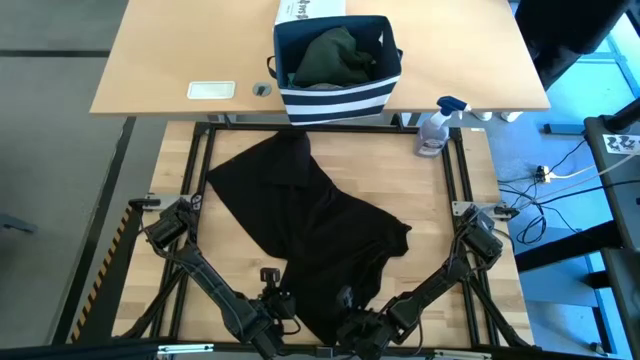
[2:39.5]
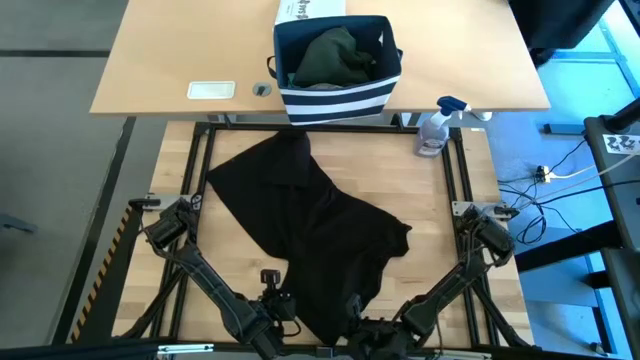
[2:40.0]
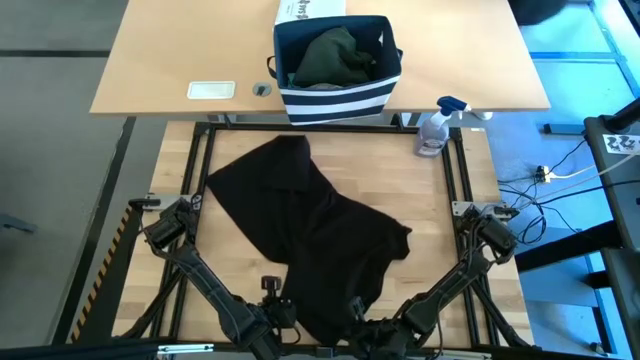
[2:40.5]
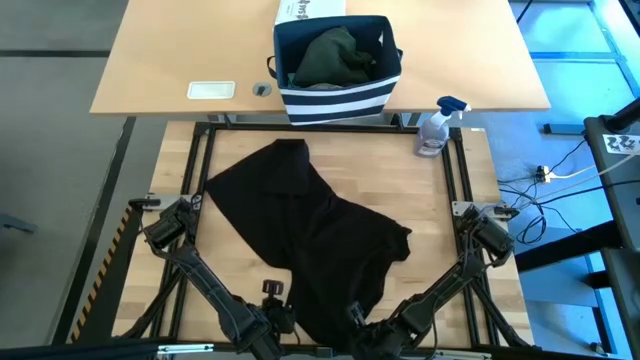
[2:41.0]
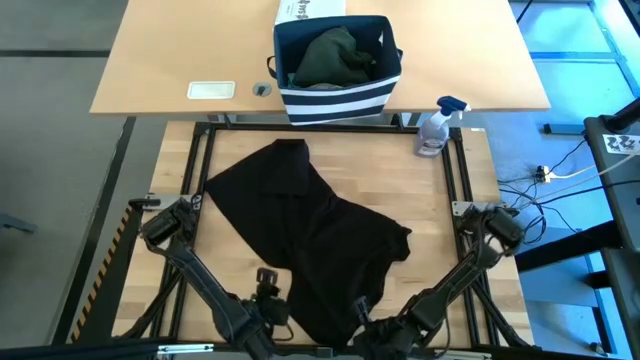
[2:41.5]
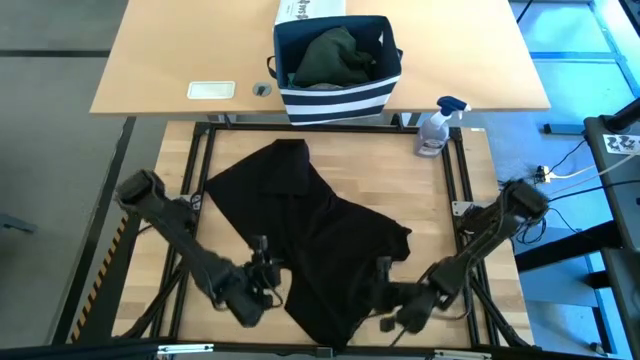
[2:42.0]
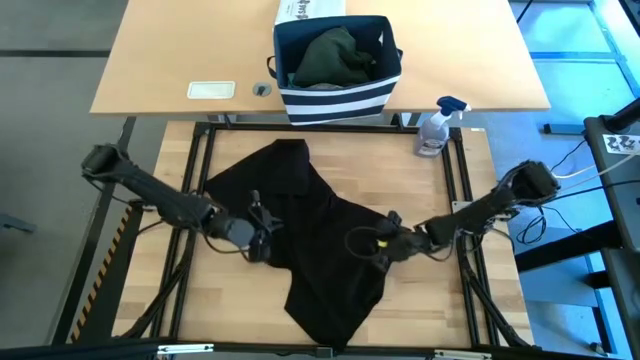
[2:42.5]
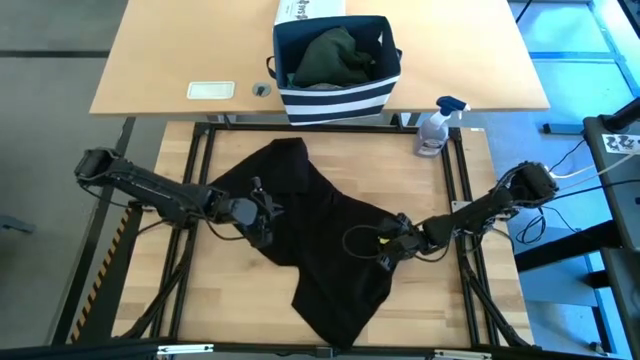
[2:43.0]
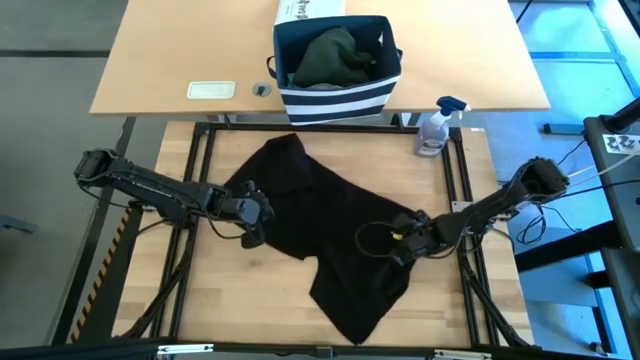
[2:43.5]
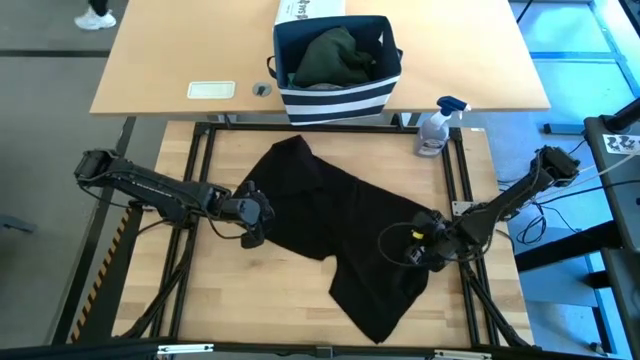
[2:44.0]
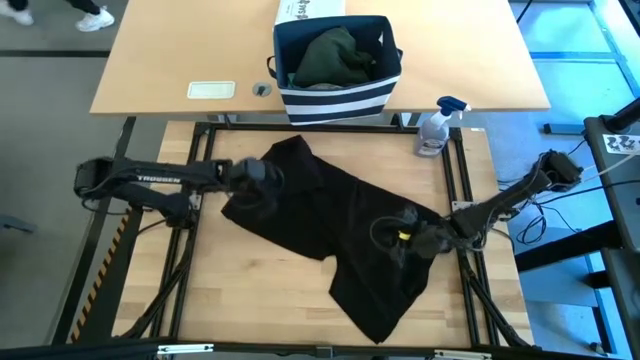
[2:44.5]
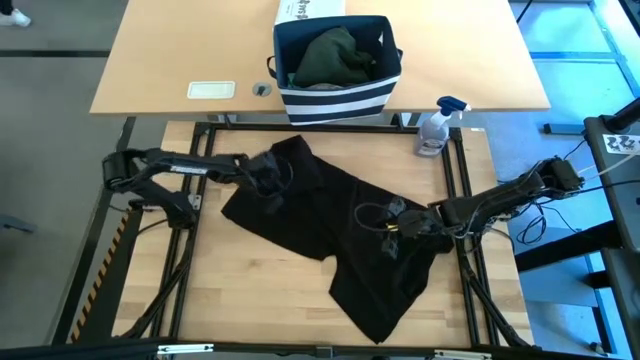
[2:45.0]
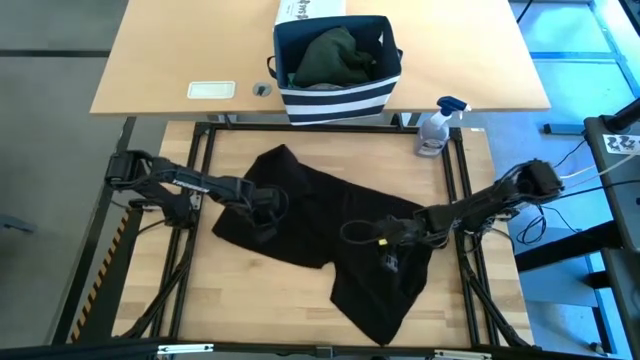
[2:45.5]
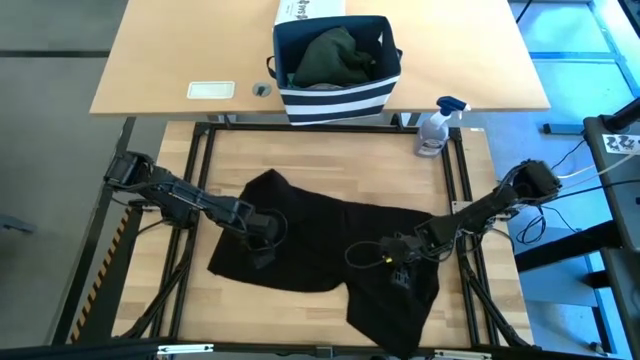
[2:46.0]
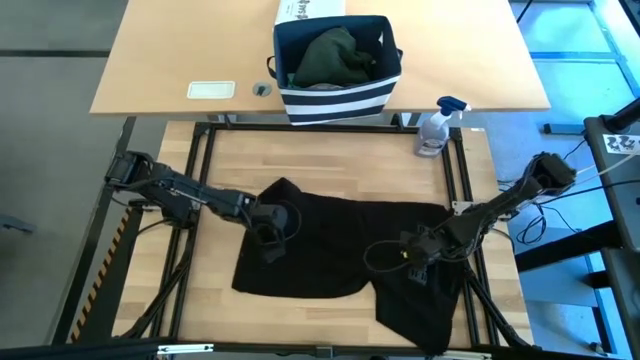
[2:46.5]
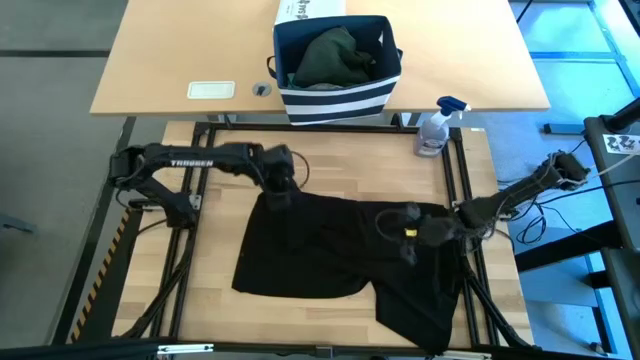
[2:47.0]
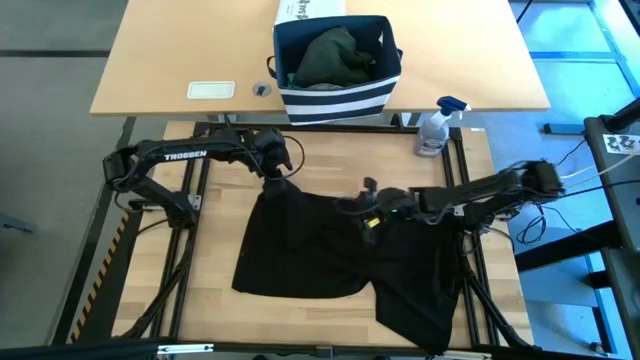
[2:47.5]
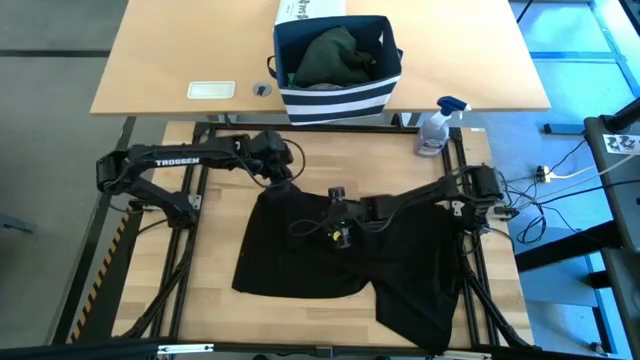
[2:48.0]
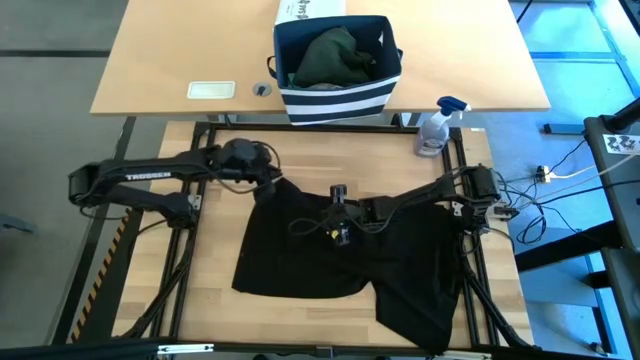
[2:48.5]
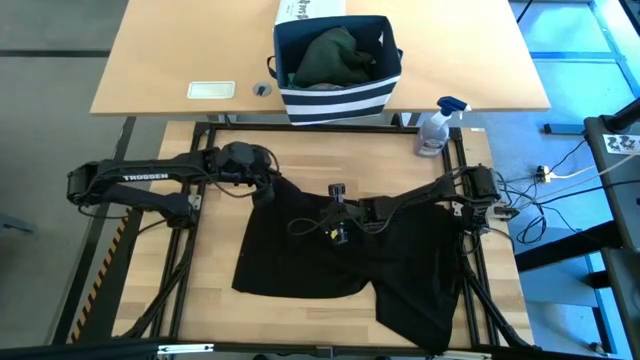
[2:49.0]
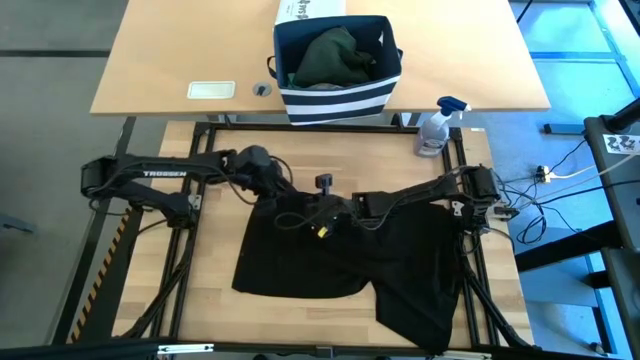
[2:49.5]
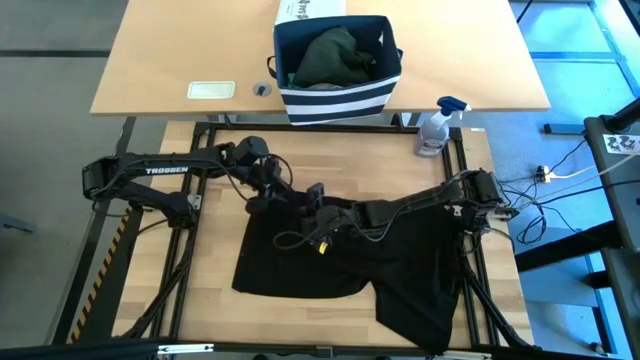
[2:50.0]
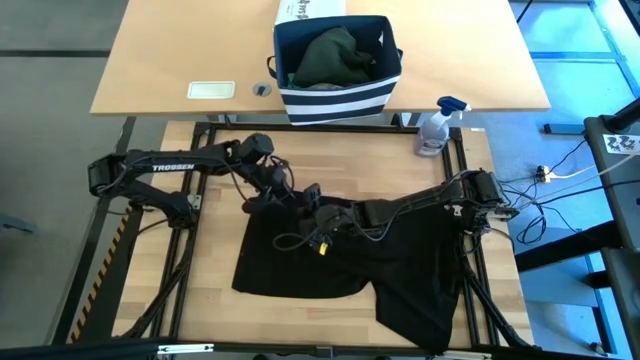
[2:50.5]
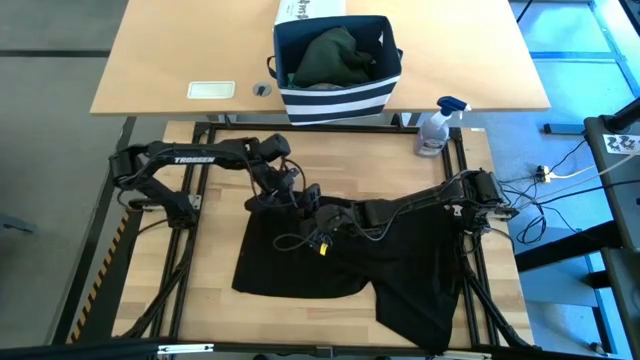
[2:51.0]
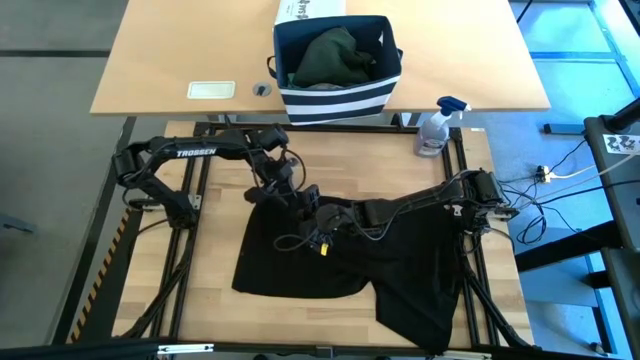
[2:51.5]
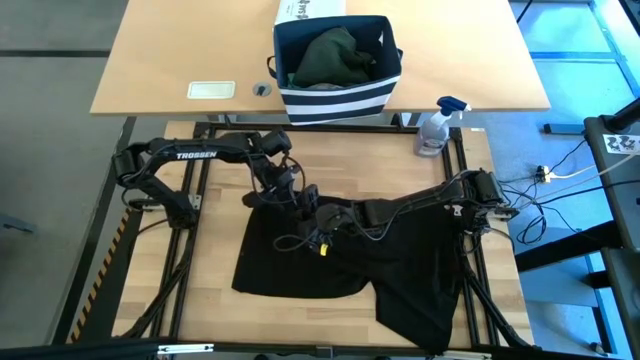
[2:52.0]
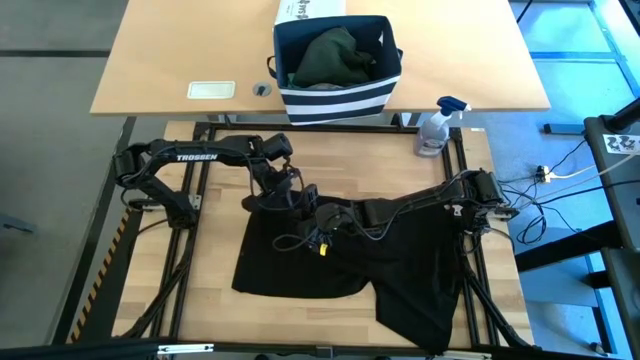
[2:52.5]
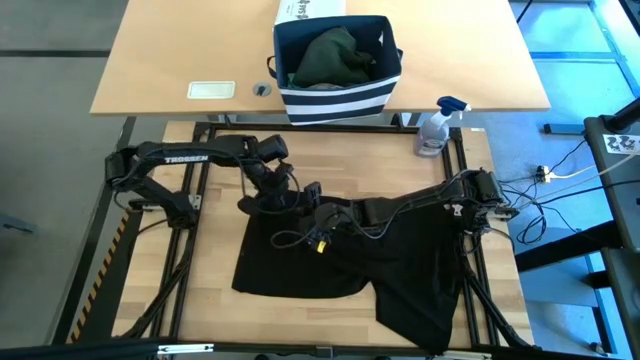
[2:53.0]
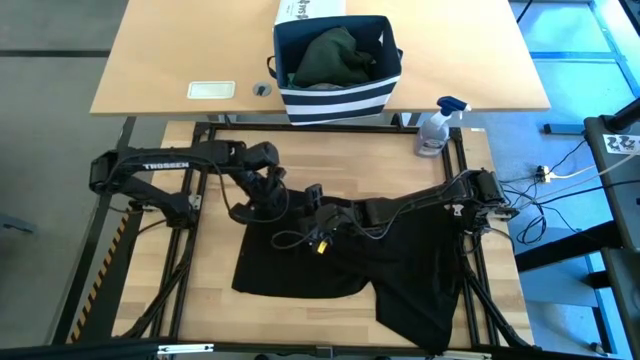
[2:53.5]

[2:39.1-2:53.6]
Task: Fold Laundry from Bin
Fold the black shirt

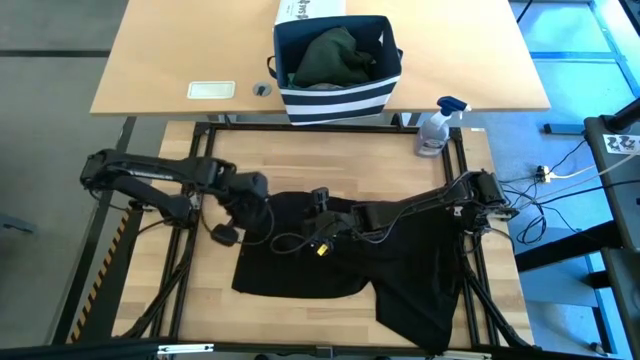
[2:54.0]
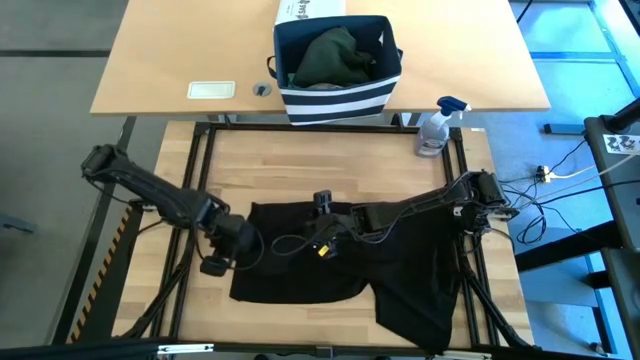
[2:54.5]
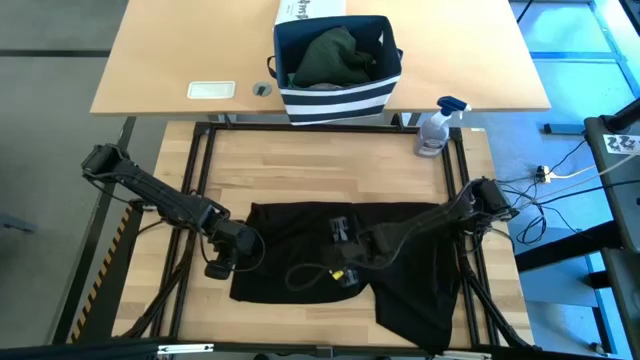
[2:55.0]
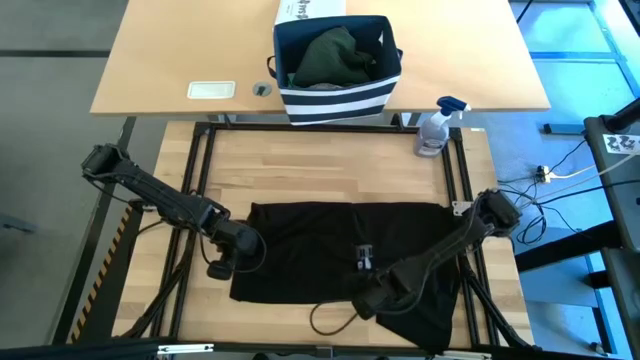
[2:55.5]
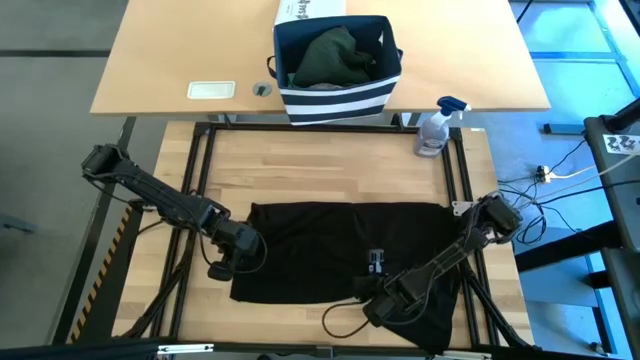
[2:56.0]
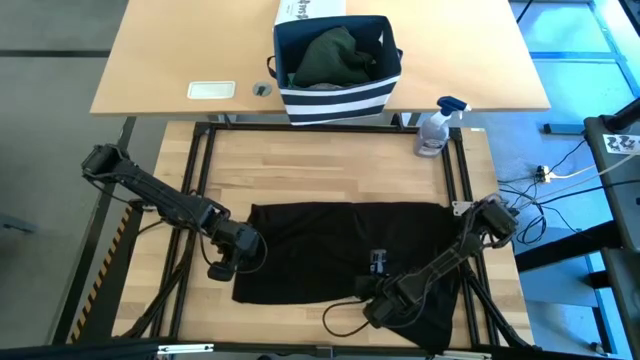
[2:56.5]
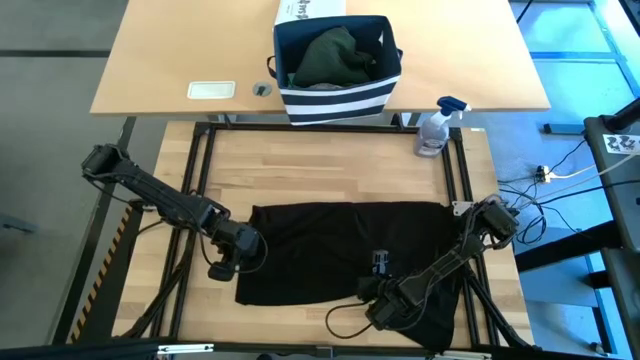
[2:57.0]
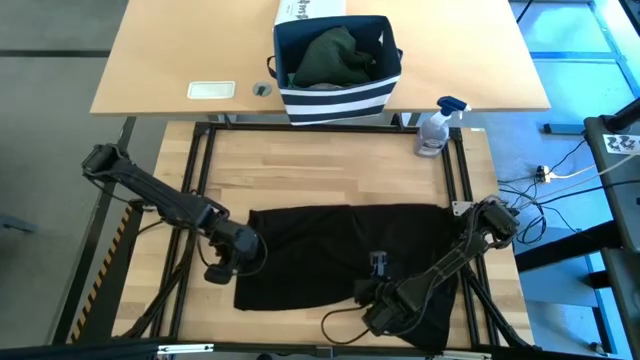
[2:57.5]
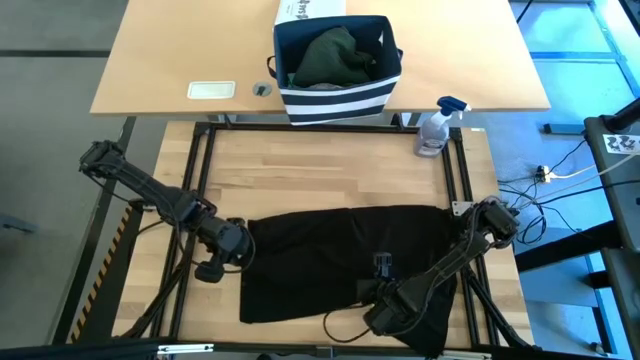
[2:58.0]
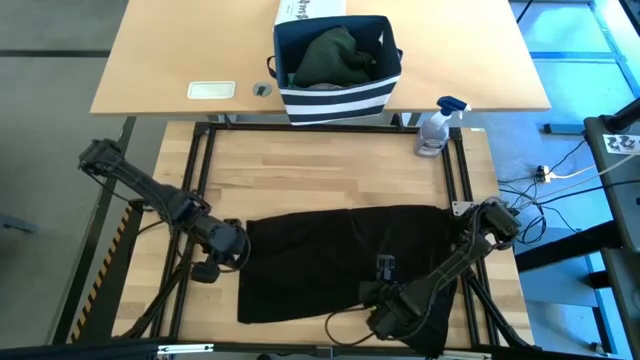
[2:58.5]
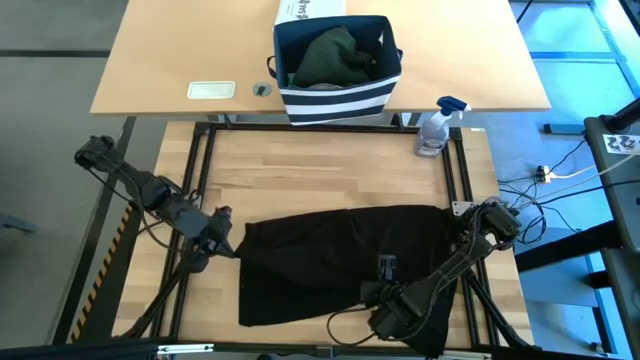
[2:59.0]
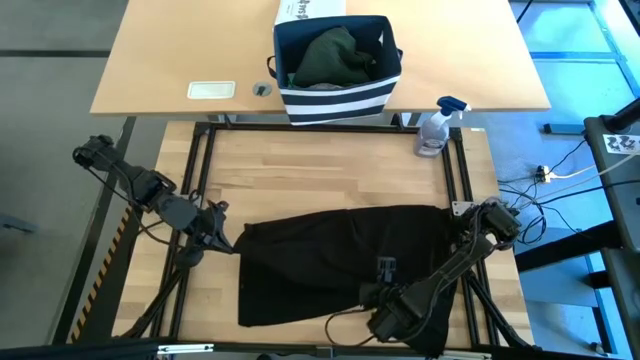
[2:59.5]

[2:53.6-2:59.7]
Fold the black shirt
